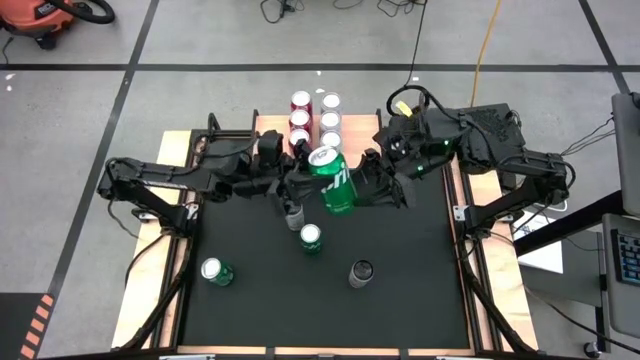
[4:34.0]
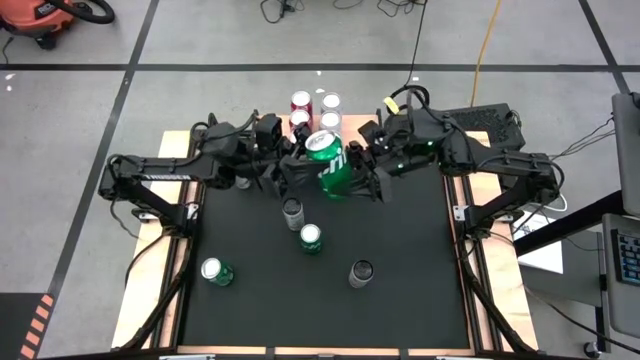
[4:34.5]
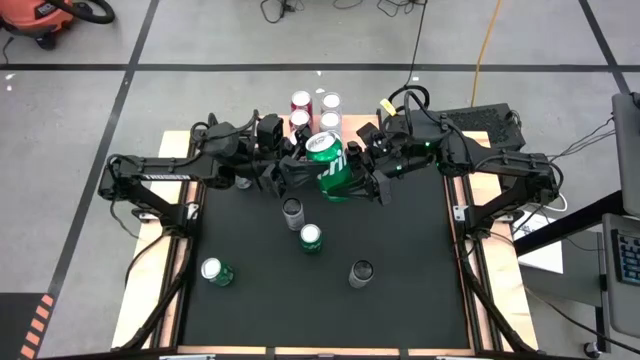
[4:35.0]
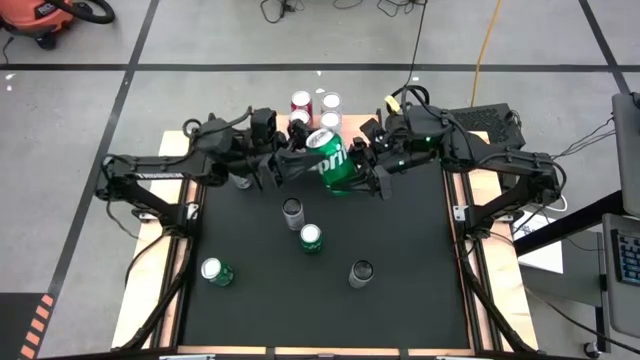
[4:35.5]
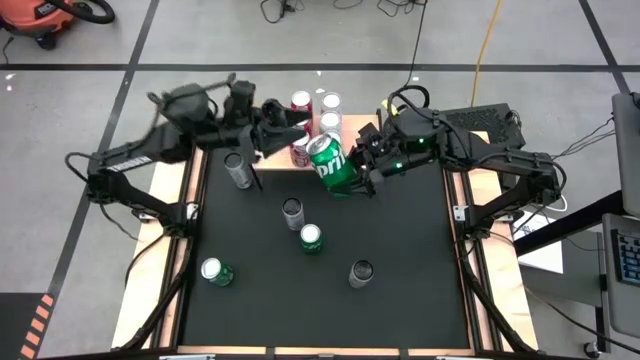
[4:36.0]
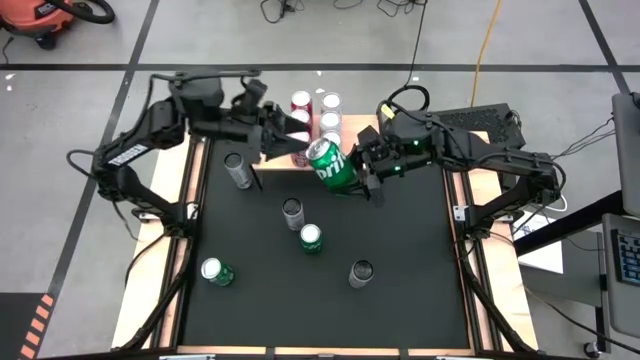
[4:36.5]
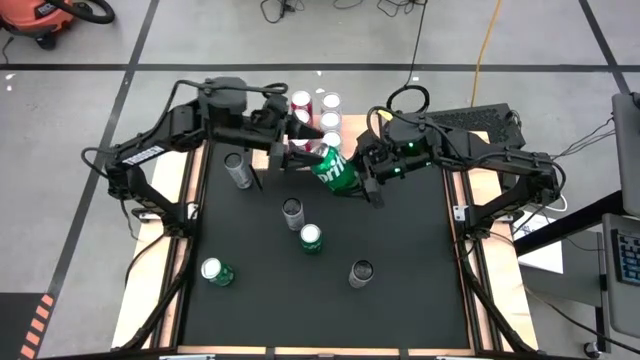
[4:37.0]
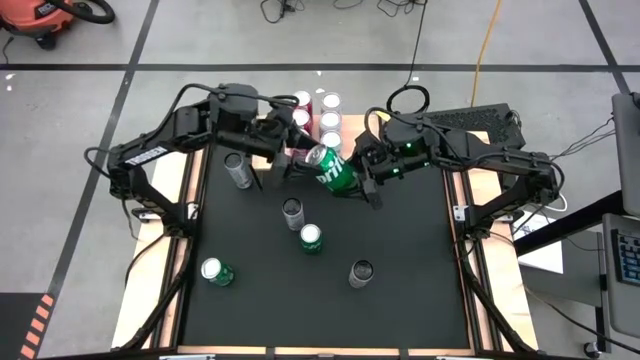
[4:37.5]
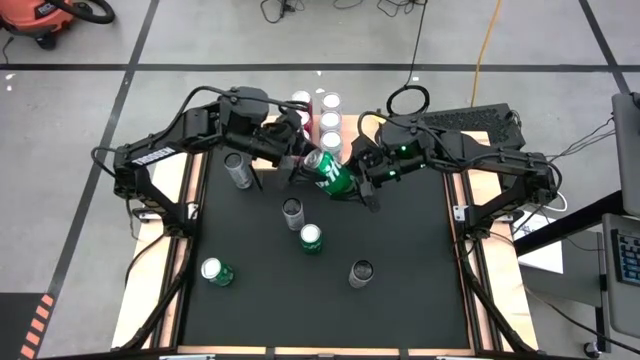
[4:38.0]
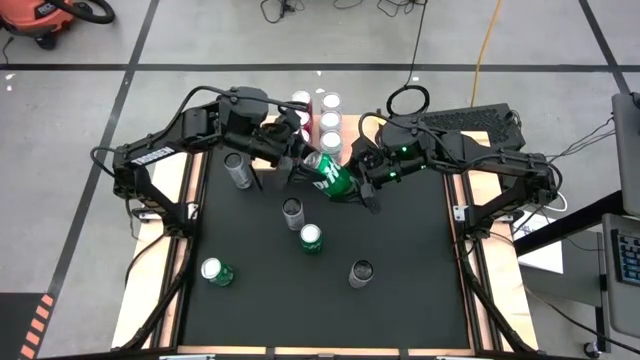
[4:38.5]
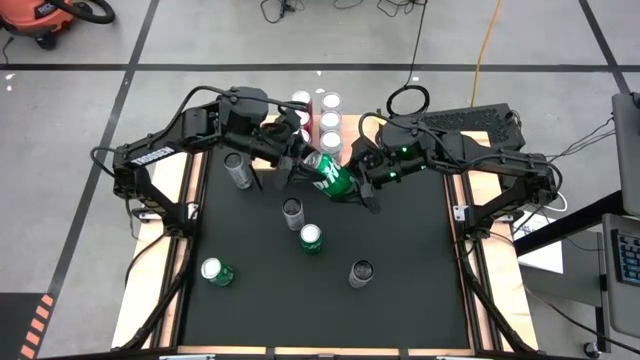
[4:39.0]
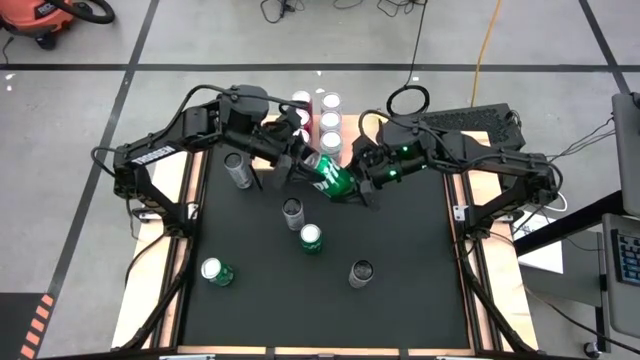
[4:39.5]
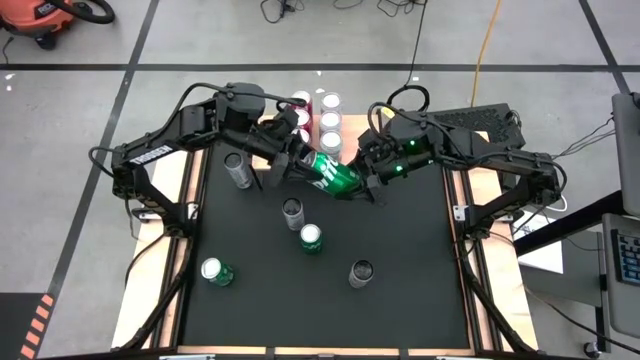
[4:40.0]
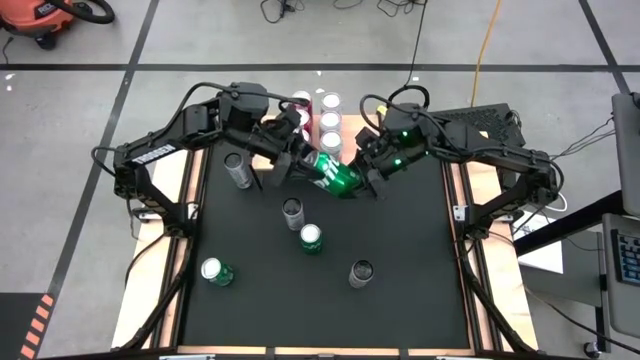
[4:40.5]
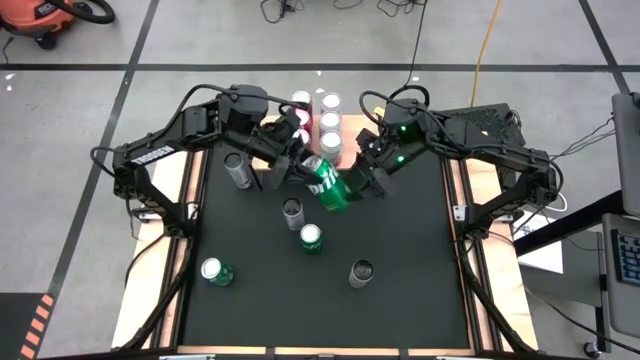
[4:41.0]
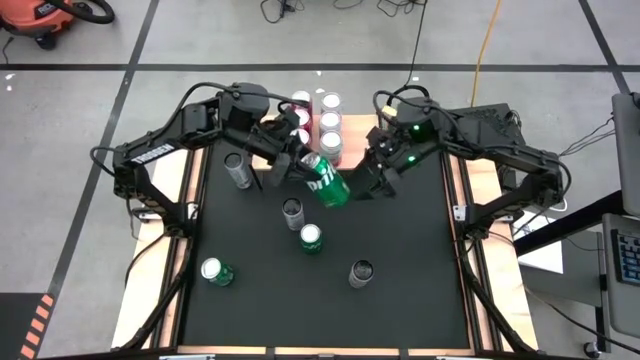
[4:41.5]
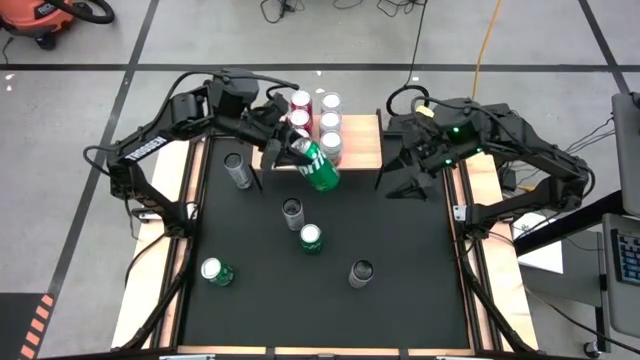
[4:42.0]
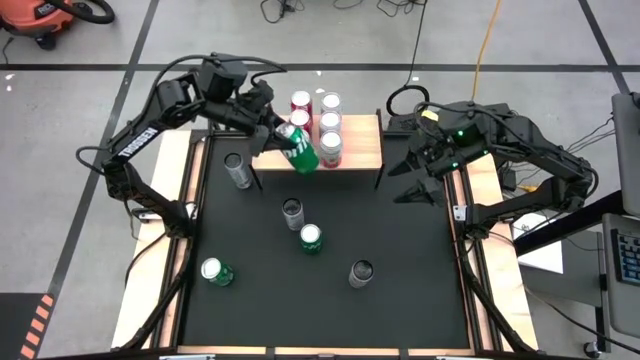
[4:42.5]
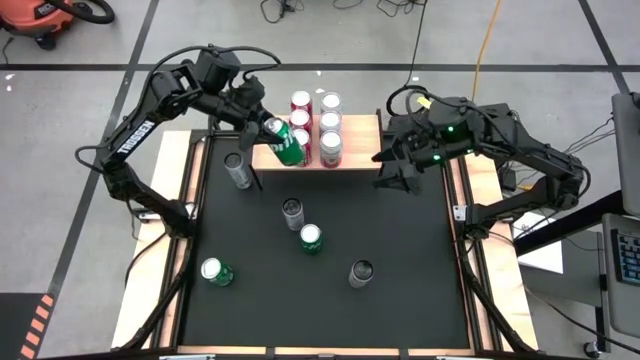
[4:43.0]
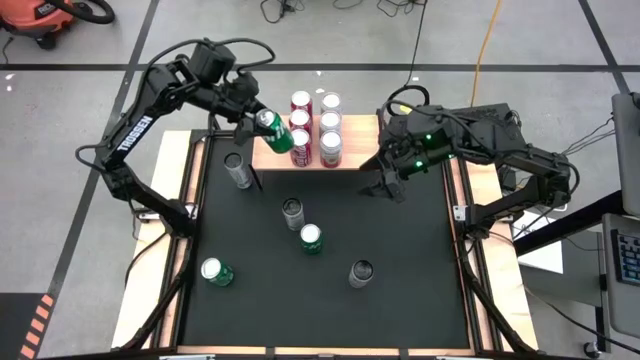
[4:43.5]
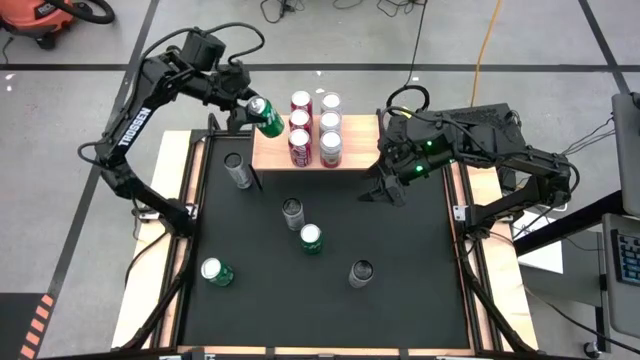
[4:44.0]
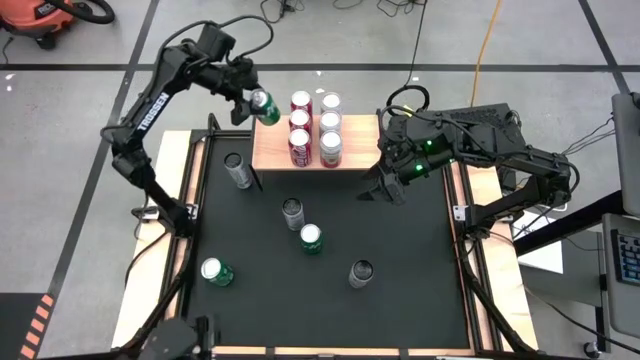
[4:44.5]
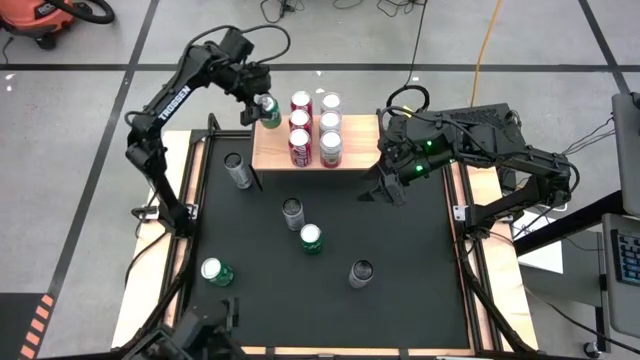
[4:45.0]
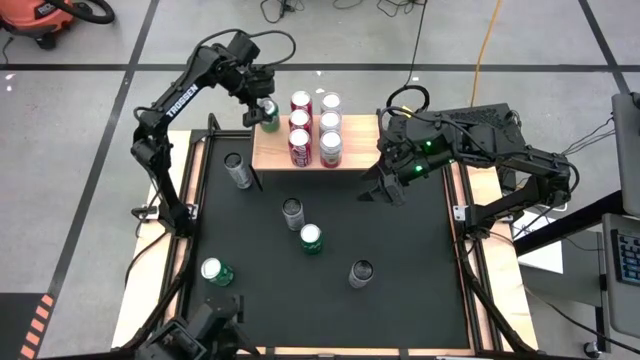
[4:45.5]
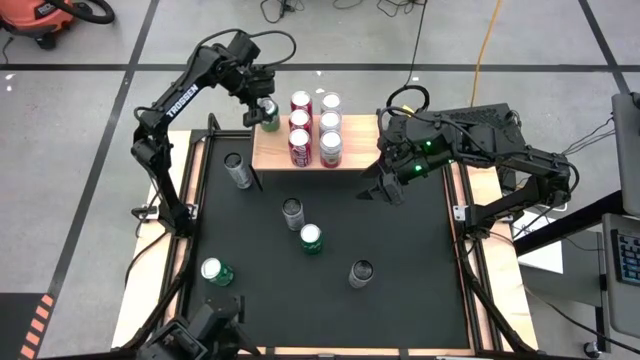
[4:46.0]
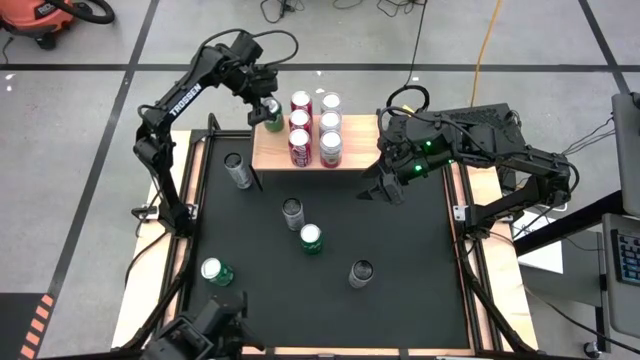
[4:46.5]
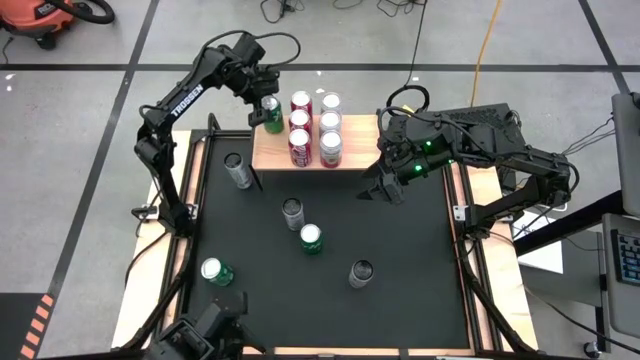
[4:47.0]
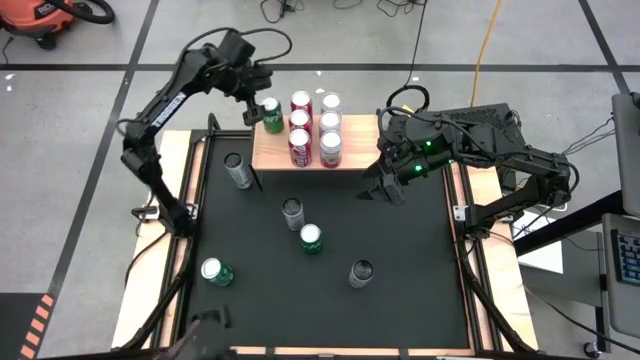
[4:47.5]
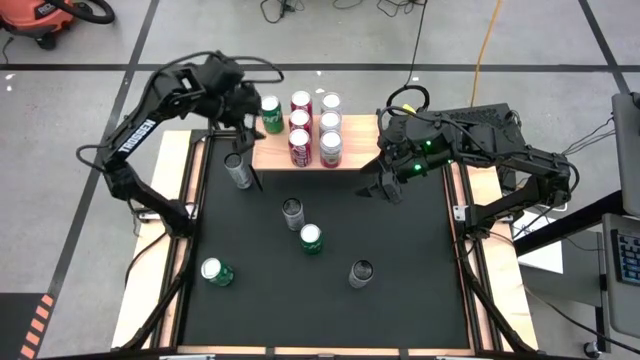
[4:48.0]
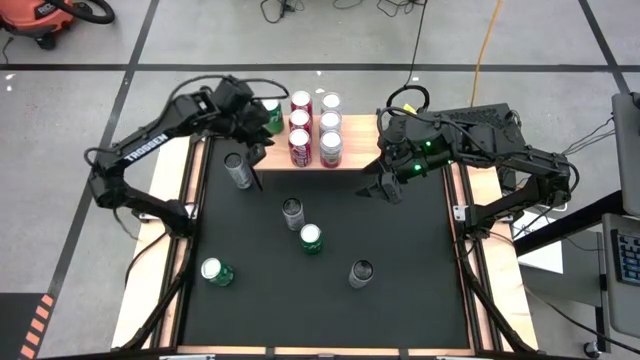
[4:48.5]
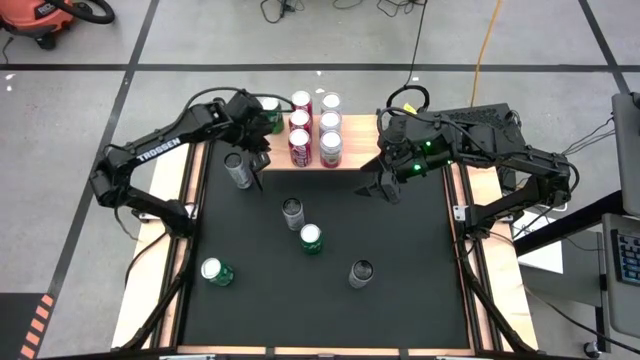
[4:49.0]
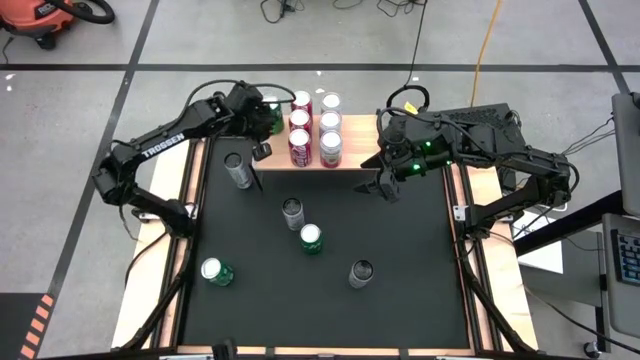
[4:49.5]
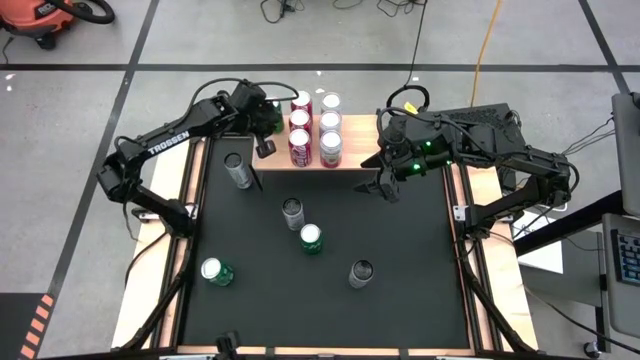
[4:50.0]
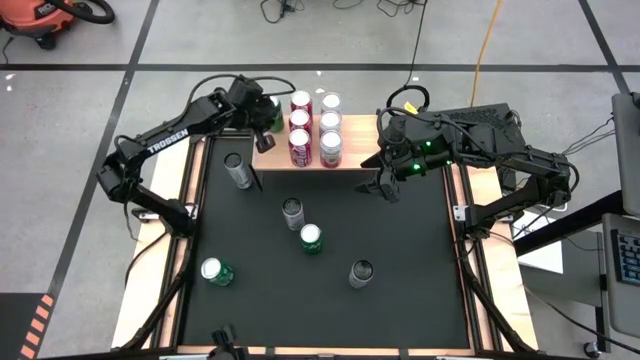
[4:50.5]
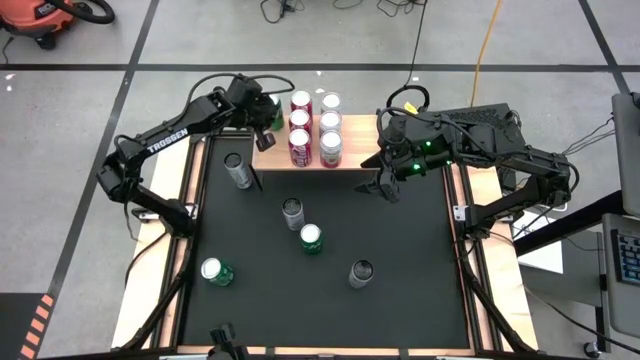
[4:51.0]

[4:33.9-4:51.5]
Task: Place canned beverage on shelf
Put the bottom green soda can on the shelf

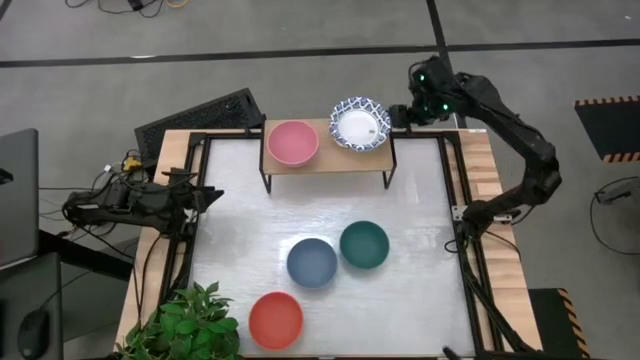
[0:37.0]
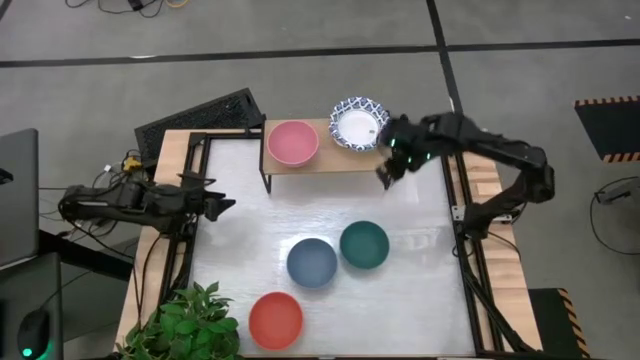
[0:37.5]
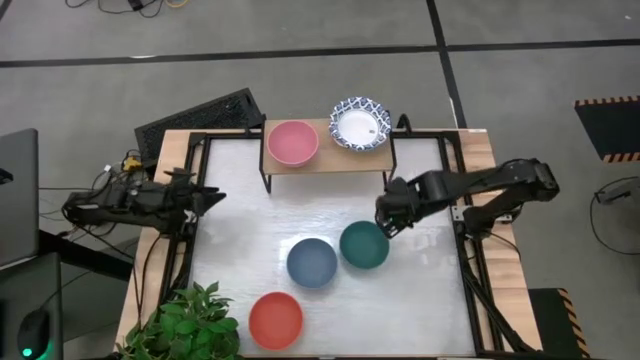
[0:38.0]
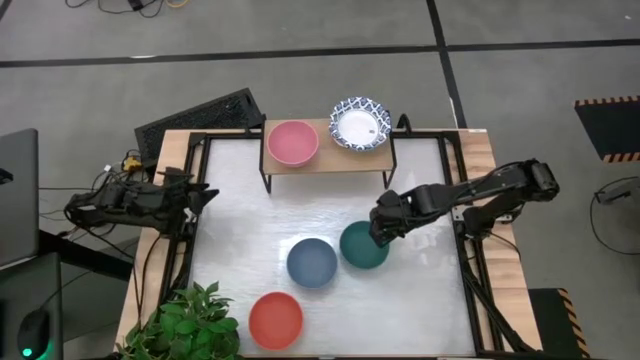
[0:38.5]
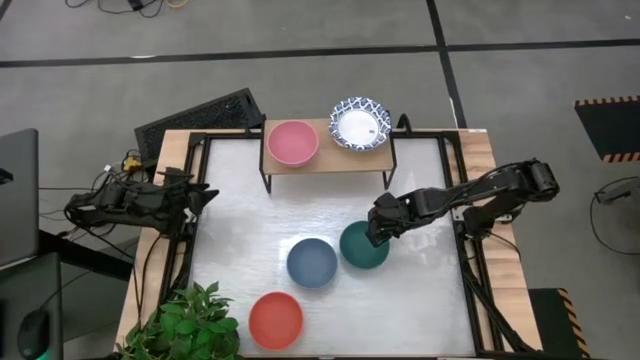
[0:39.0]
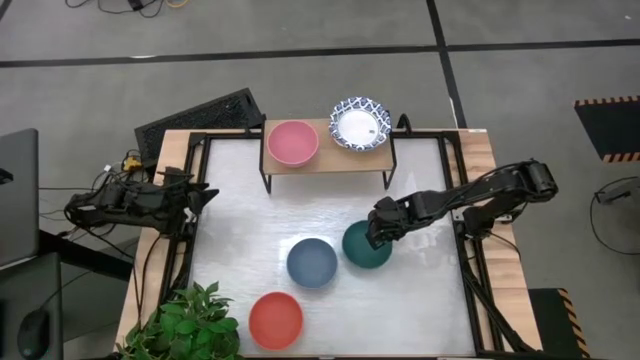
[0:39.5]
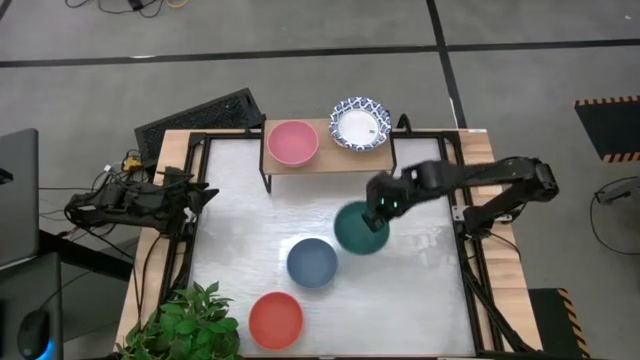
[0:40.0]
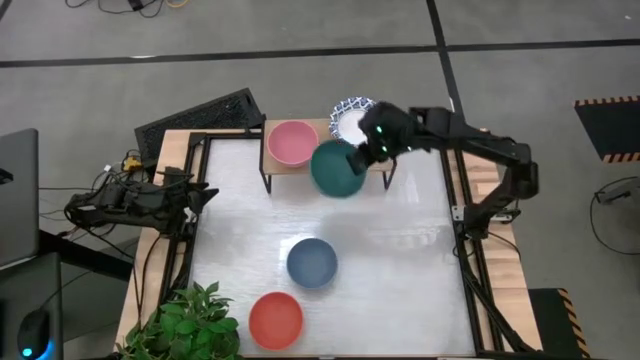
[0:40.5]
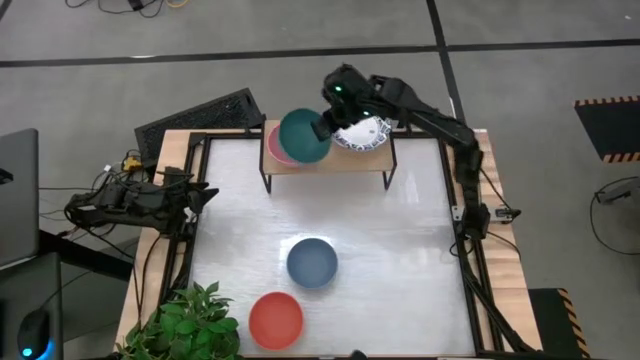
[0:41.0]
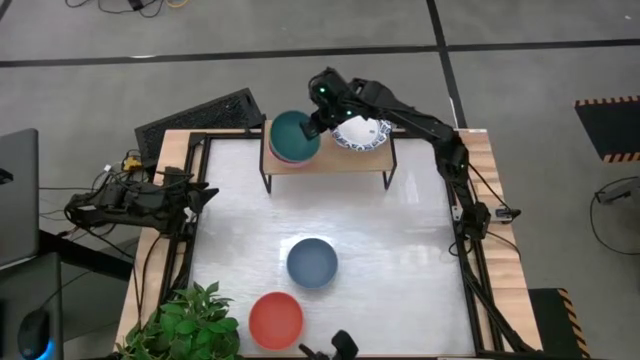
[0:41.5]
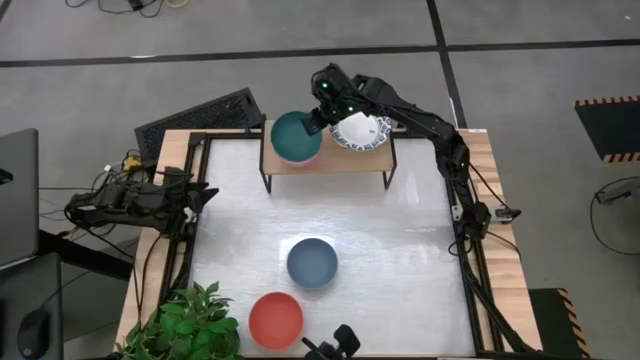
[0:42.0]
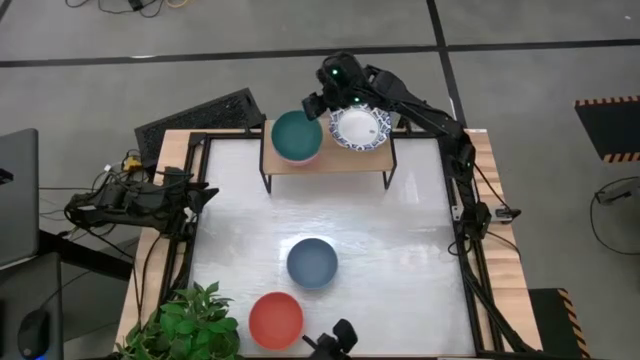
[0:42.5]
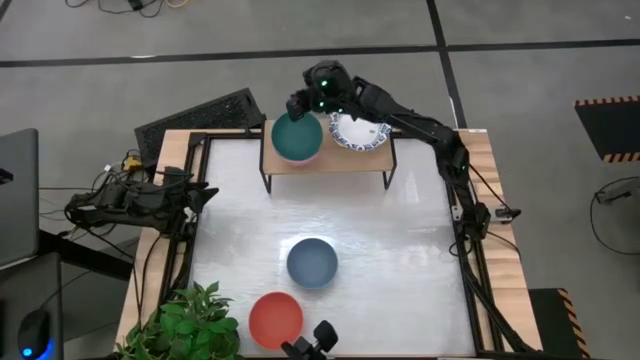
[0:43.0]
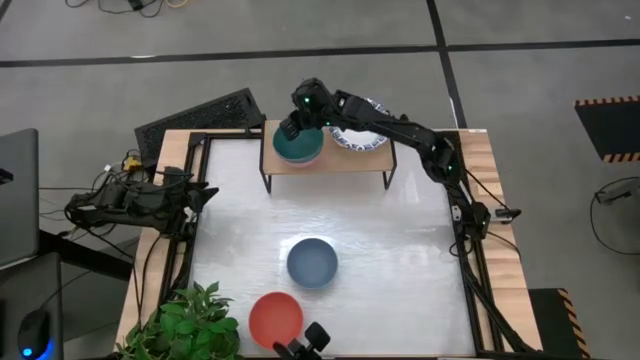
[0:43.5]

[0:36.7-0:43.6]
Task: Place and stack bowls onto a shelf
Stack the green bowl on top of the pink bowl on the shelf
